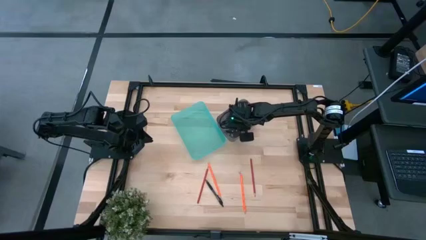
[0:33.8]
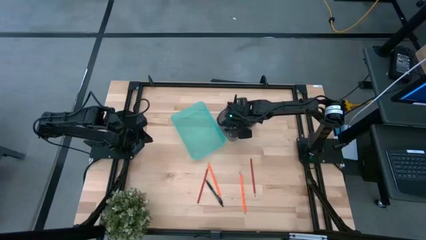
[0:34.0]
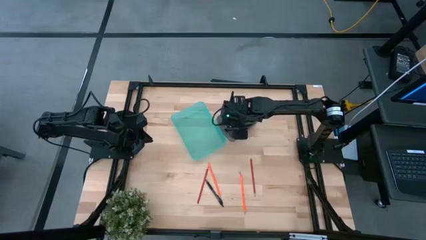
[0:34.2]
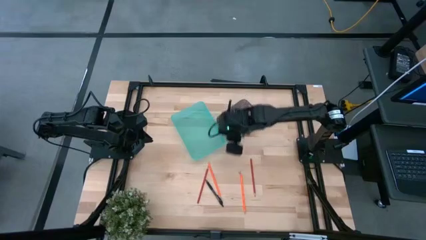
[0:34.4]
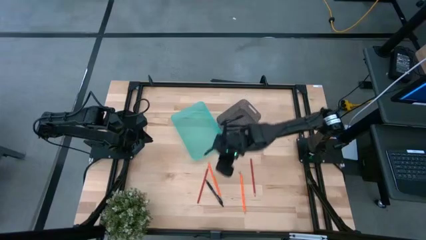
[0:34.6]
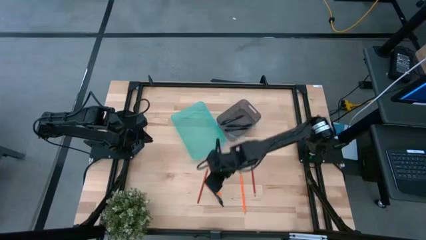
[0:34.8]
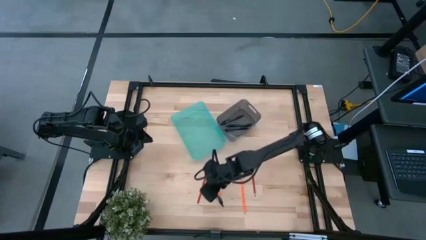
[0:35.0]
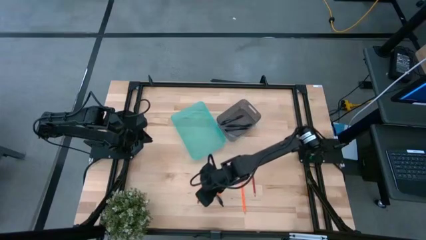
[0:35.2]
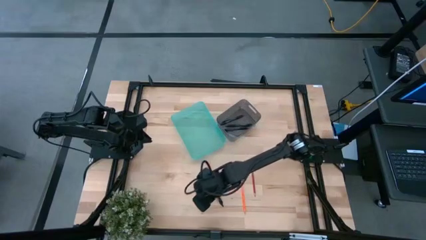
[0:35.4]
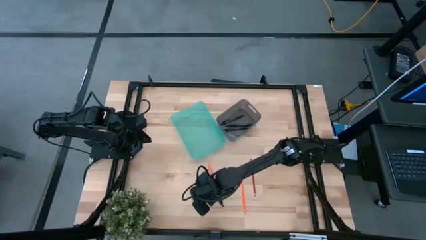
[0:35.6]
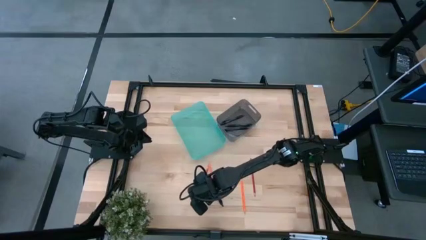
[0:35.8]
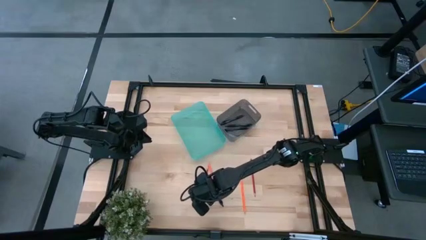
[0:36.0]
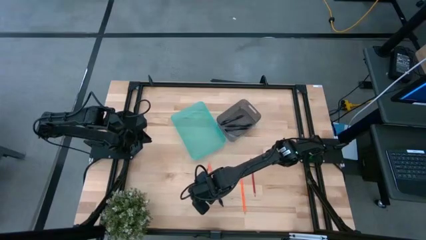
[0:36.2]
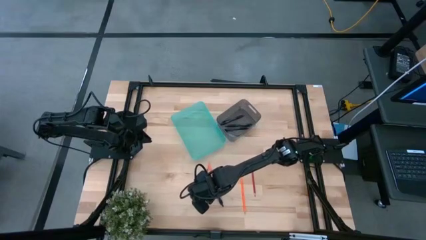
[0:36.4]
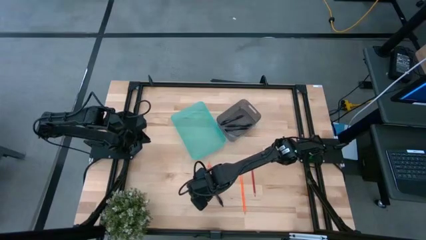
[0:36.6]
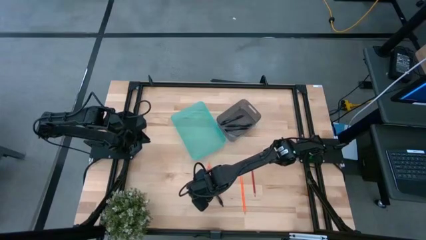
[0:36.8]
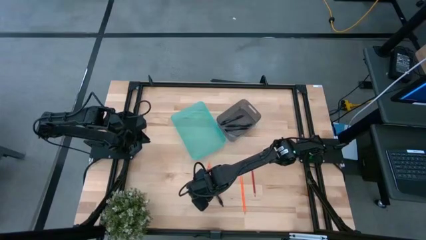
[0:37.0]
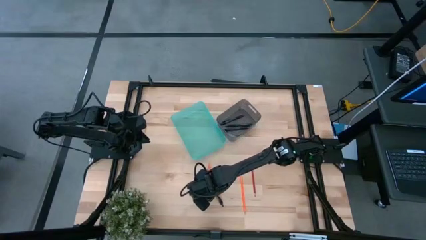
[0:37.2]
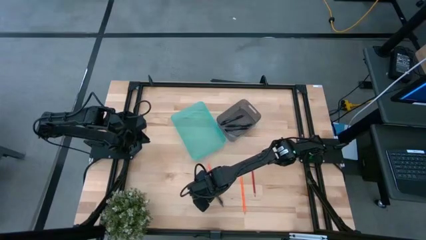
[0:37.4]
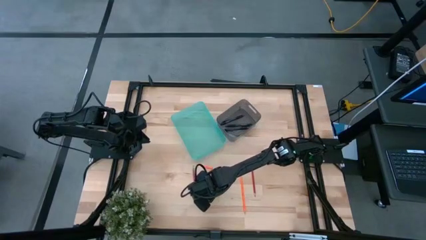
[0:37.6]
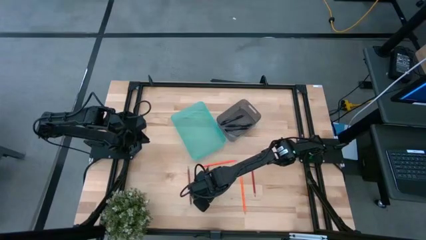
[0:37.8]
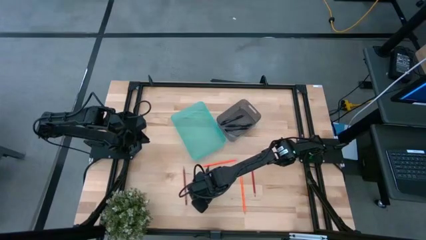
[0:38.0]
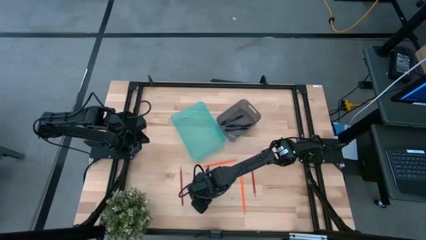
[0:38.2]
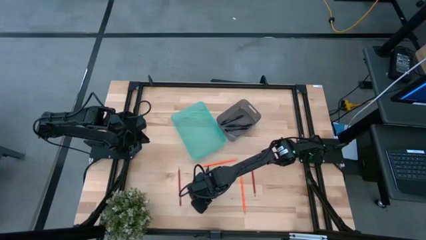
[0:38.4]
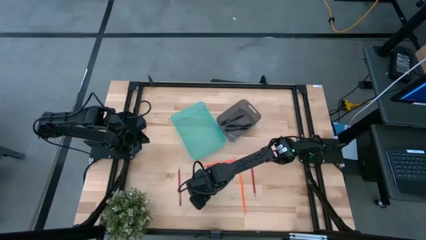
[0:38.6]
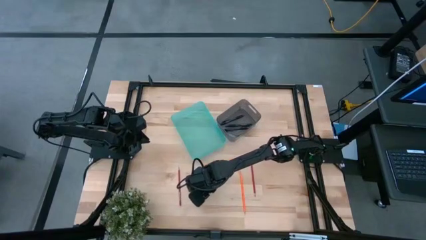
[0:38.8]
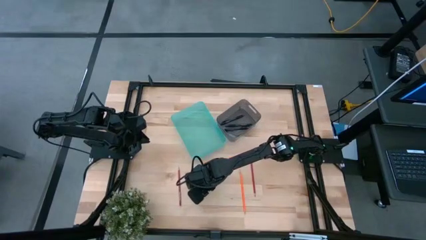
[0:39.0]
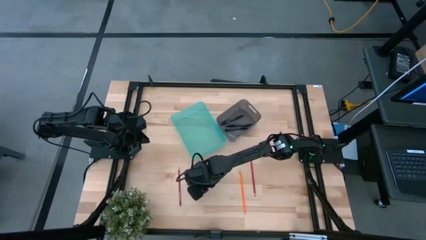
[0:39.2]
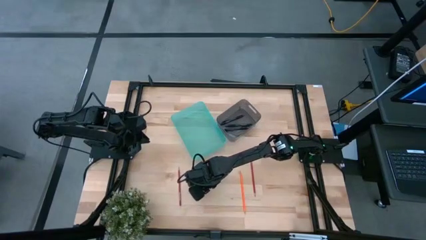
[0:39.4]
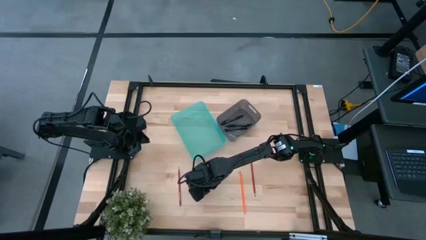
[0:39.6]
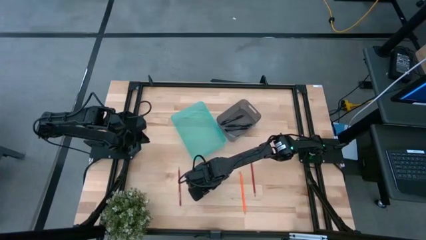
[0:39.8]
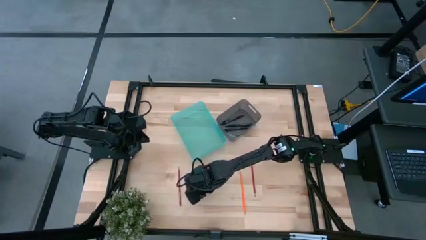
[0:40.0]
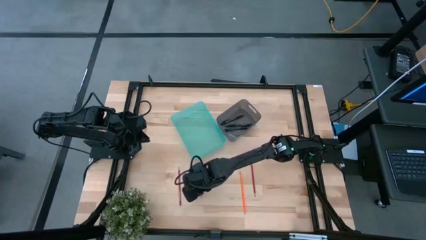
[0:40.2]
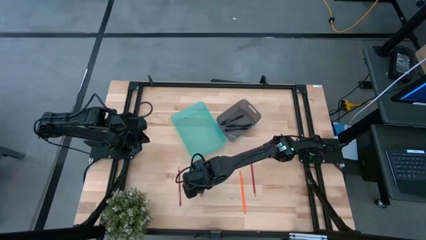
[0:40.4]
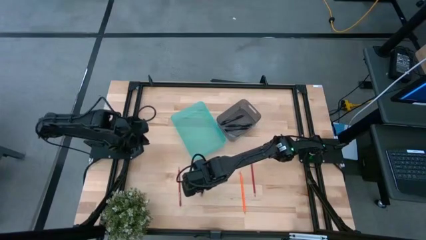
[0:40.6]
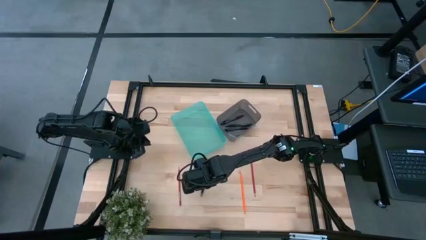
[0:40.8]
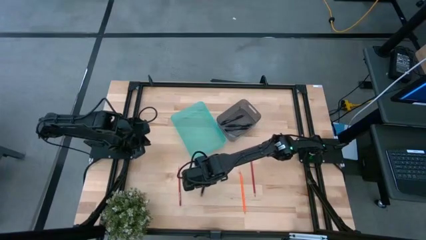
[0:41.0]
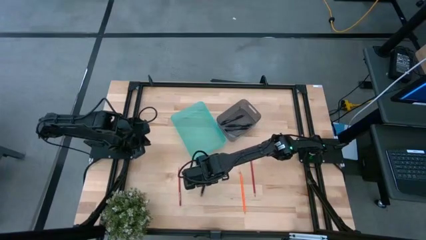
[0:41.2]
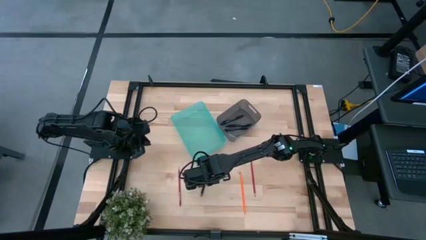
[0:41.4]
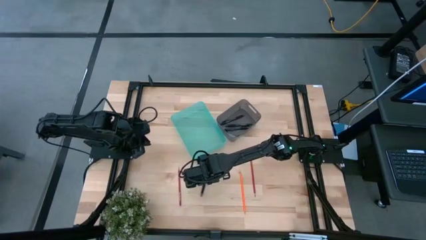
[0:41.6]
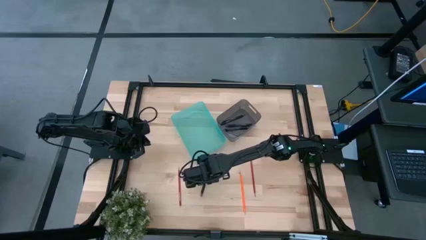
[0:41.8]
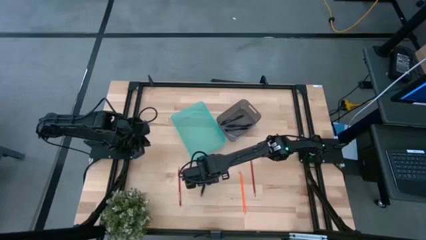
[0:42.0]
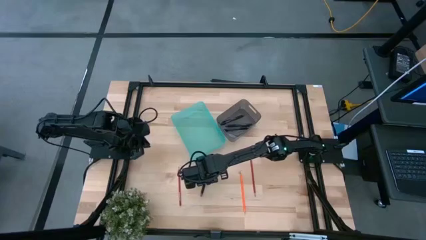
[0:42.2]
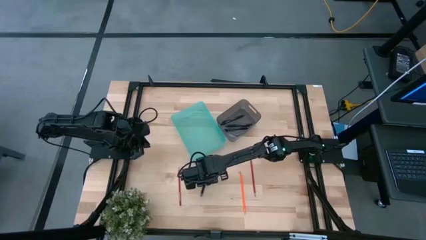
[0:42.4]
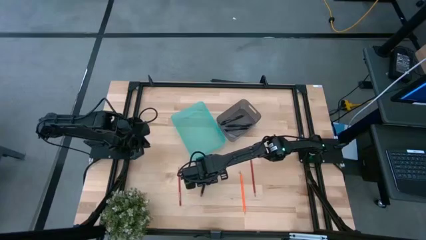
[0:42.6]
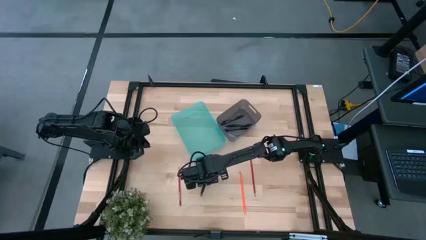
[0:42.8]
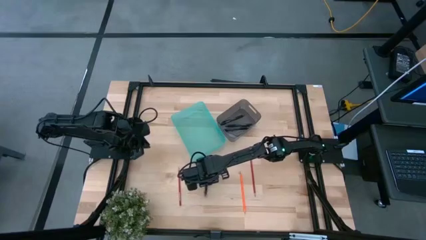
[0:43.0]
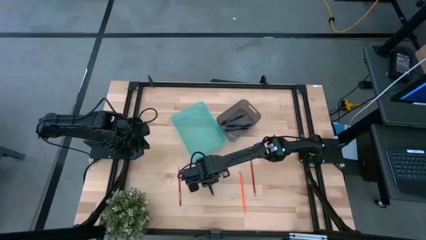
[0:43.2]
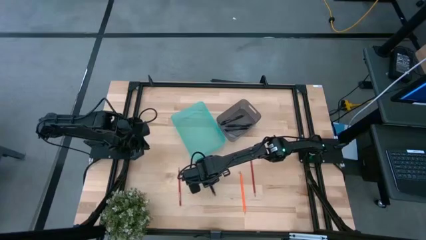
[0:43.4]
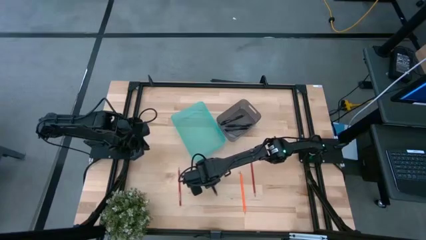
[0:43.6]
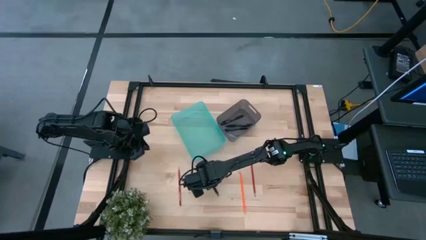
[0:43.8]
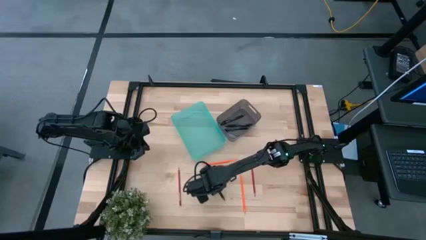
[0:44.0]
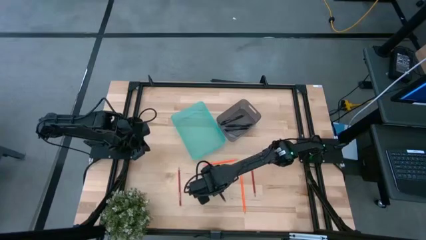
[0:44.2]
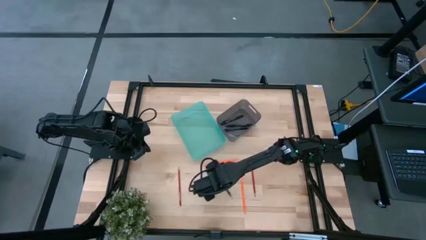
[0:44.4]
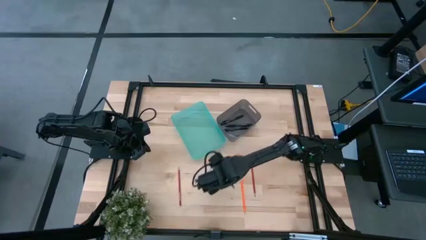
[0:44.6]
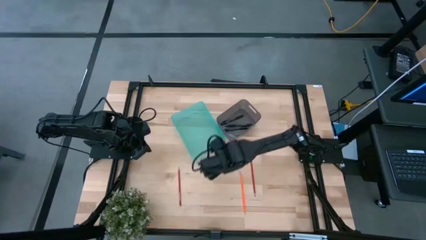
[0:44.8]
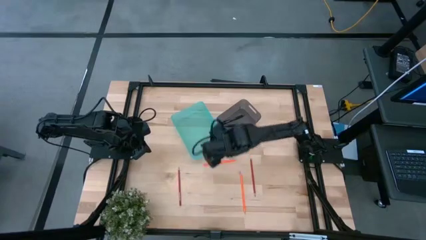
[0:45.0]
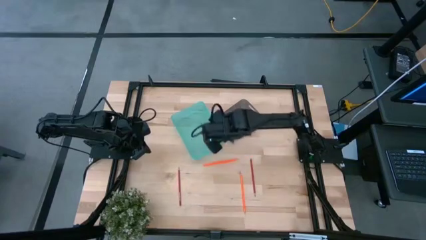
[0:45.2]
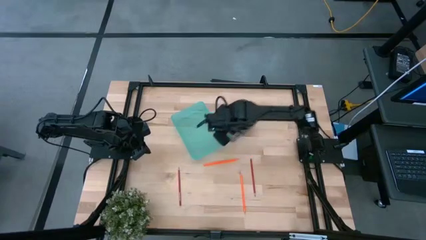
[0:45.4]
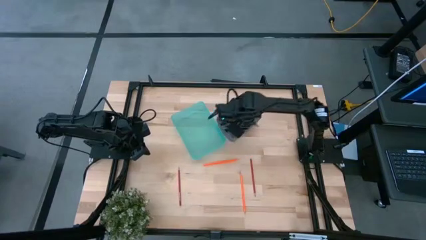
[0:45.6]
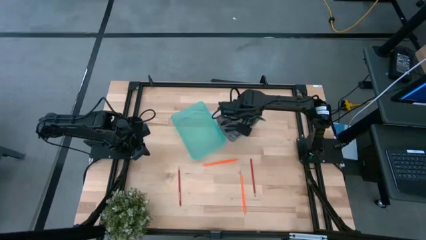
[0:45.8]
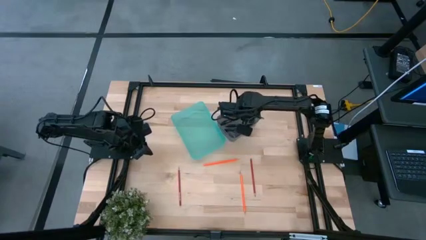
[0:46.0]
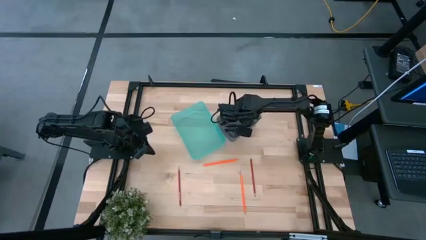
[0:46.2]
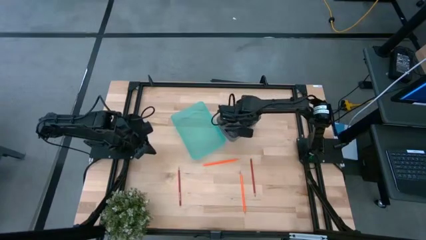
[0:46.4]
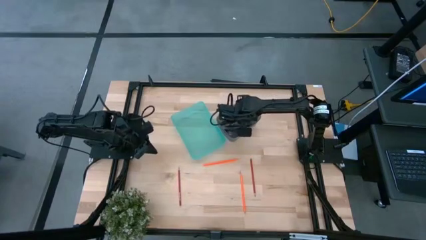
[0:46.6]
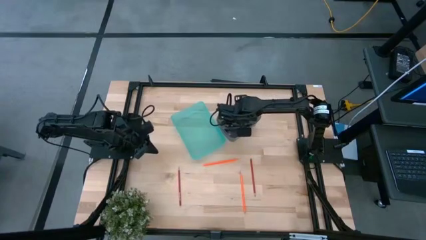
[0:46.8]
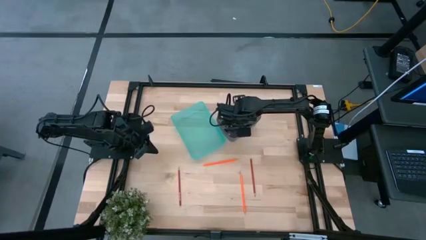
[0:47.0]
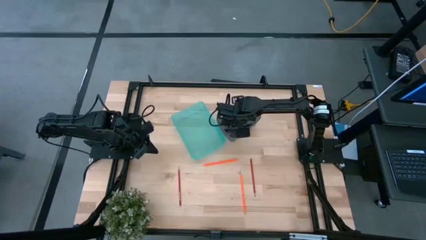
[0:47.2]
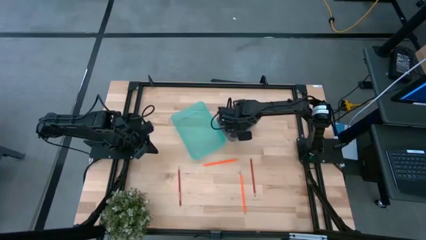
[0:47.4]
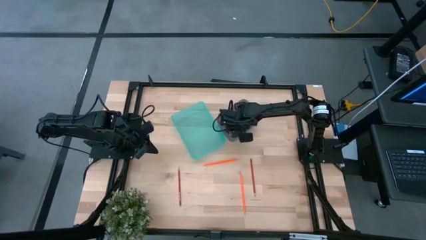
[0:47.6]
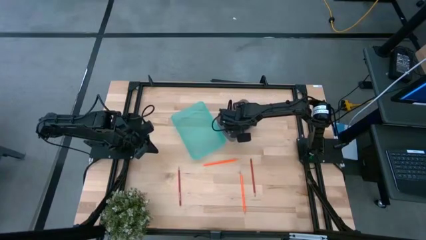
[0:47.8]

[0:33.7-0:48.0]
Task: Sort pens & pencils
Put the black pen into the black bin
